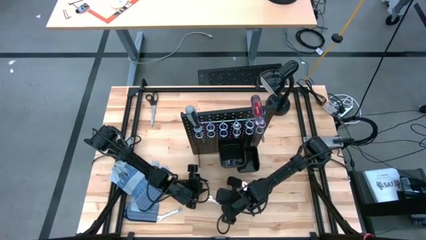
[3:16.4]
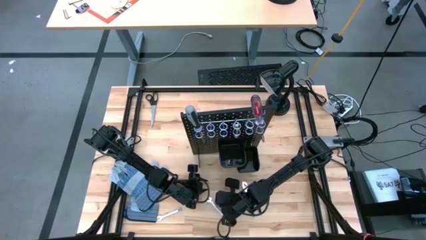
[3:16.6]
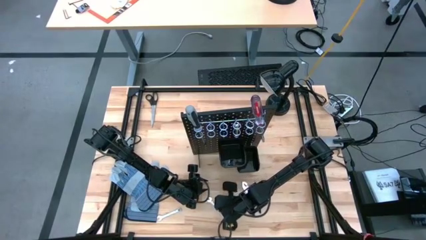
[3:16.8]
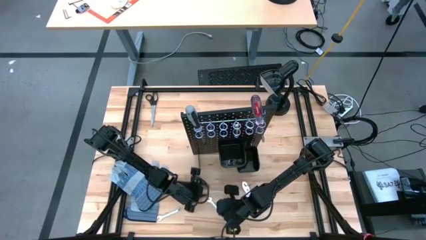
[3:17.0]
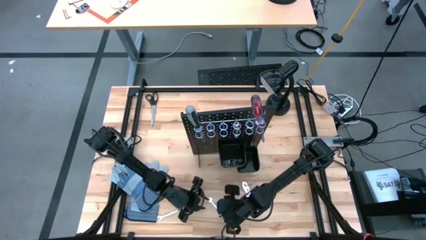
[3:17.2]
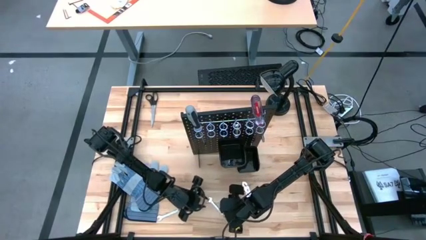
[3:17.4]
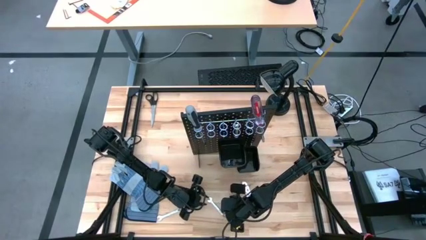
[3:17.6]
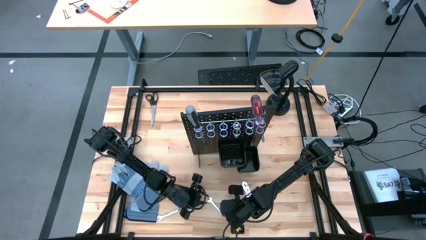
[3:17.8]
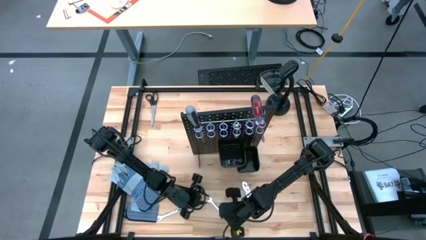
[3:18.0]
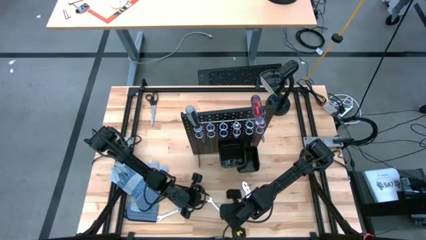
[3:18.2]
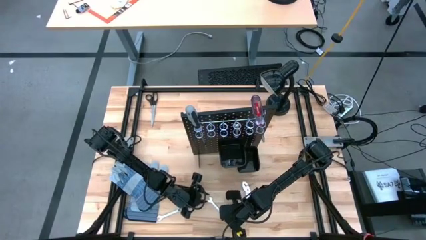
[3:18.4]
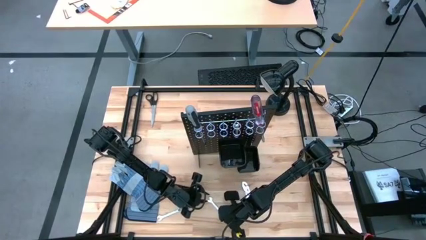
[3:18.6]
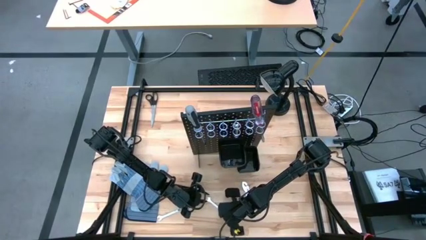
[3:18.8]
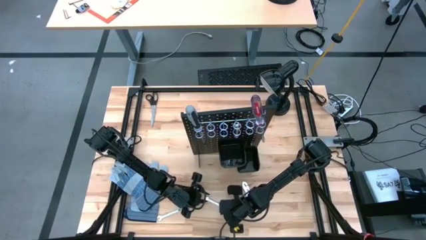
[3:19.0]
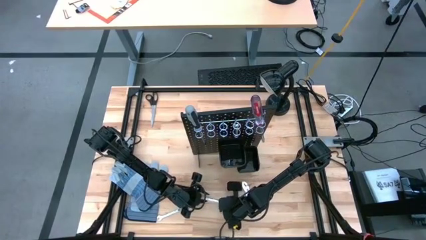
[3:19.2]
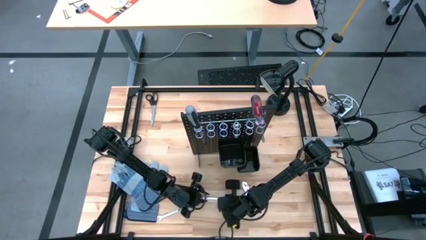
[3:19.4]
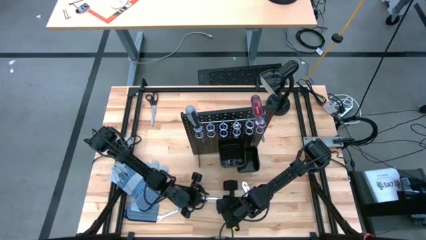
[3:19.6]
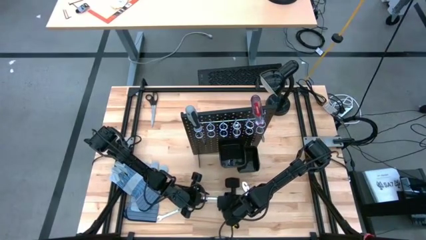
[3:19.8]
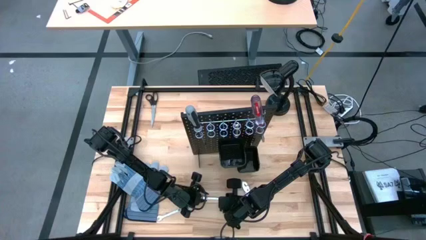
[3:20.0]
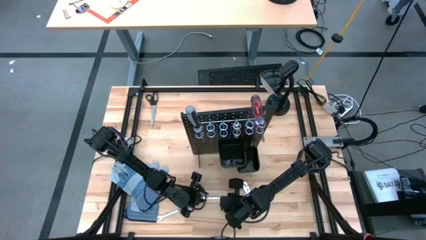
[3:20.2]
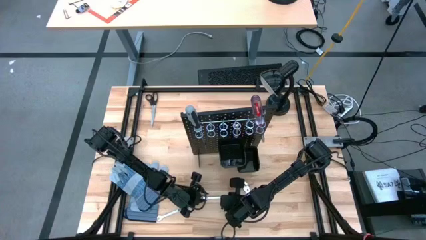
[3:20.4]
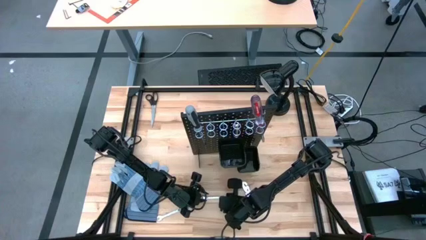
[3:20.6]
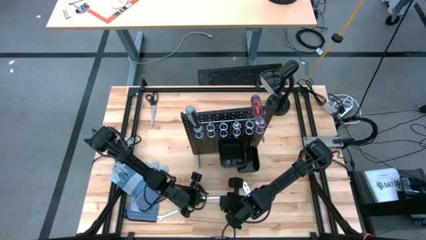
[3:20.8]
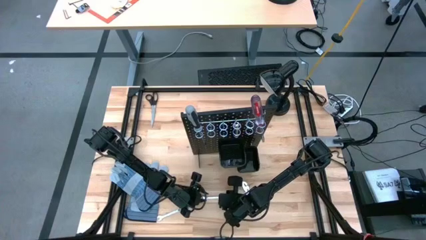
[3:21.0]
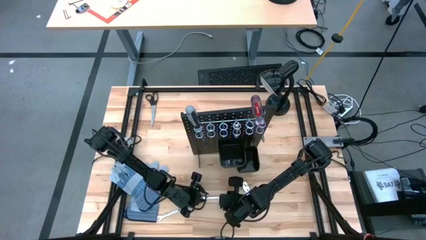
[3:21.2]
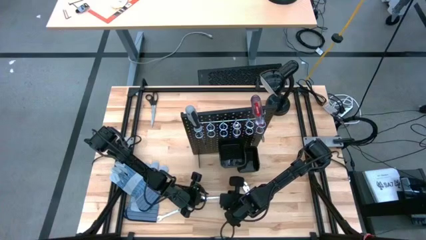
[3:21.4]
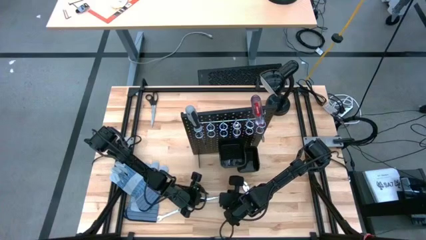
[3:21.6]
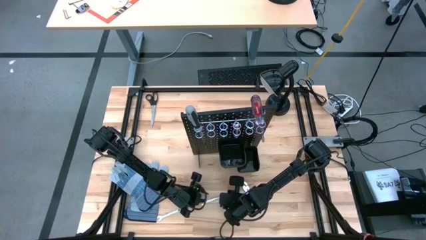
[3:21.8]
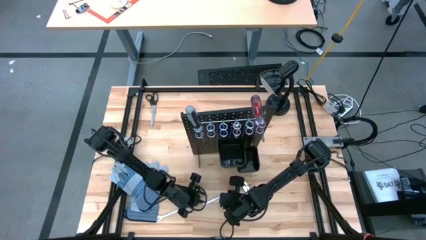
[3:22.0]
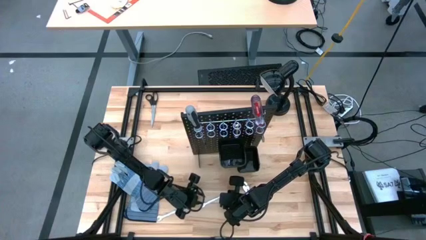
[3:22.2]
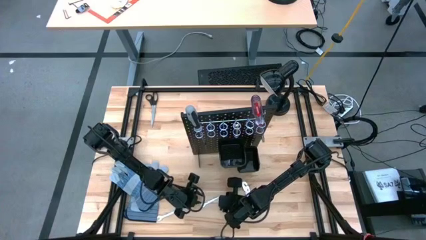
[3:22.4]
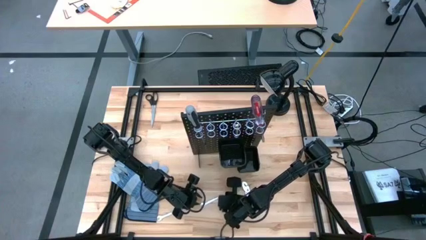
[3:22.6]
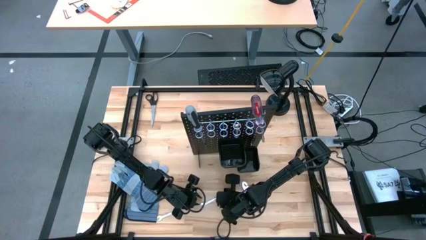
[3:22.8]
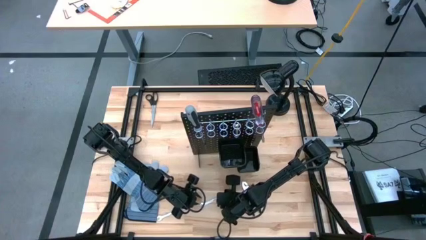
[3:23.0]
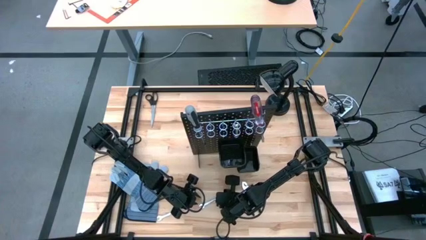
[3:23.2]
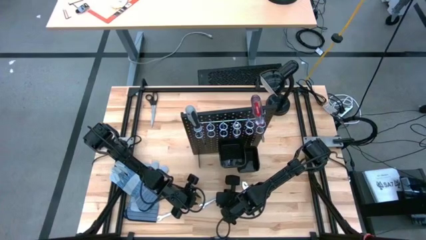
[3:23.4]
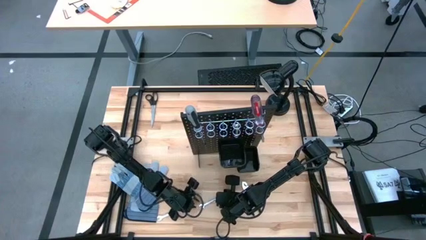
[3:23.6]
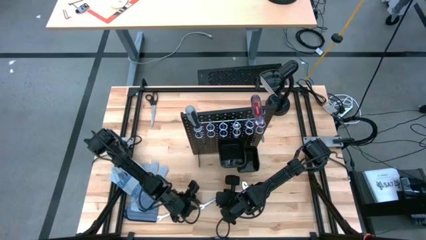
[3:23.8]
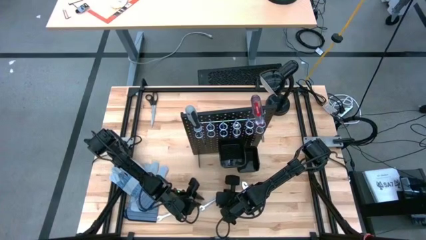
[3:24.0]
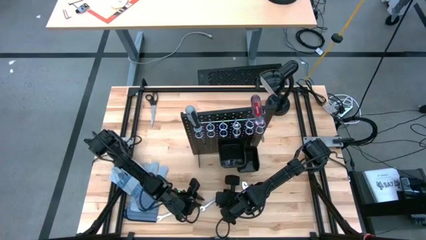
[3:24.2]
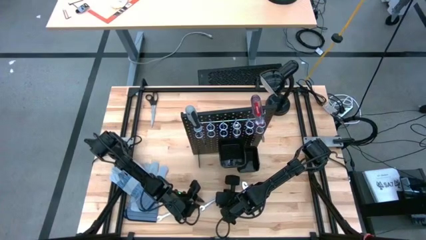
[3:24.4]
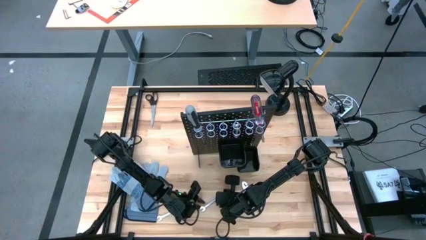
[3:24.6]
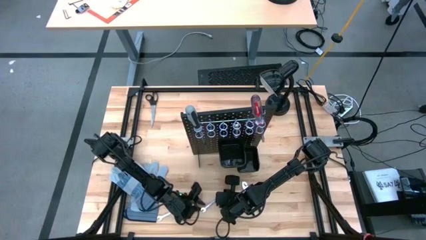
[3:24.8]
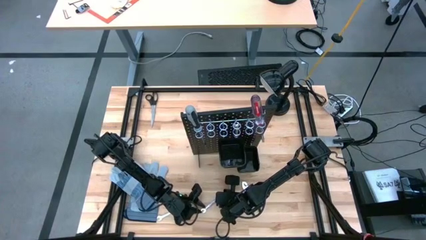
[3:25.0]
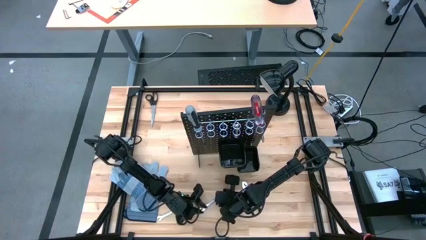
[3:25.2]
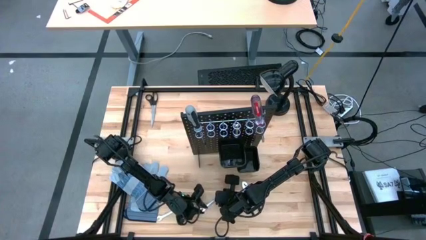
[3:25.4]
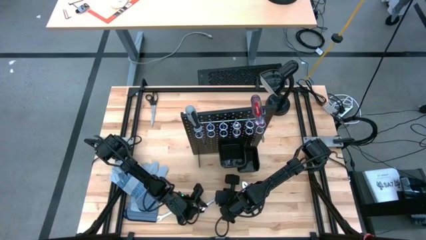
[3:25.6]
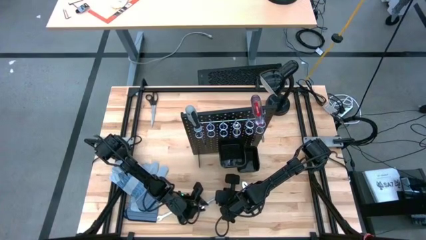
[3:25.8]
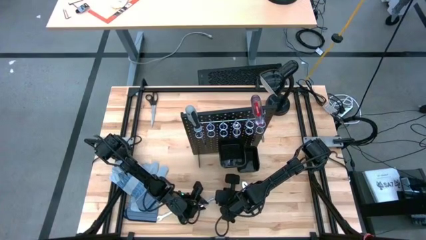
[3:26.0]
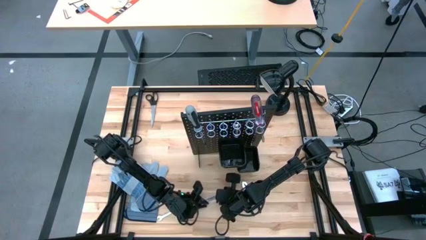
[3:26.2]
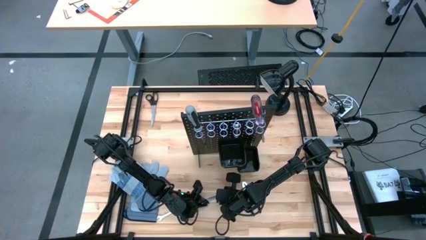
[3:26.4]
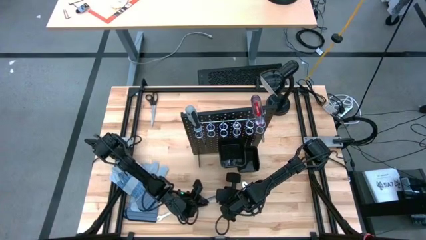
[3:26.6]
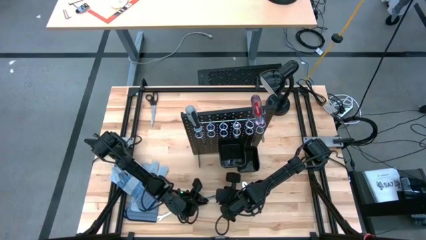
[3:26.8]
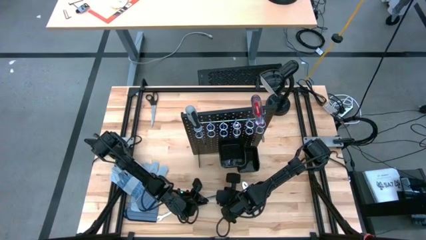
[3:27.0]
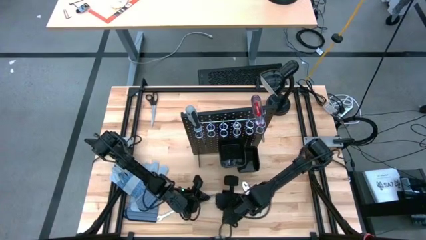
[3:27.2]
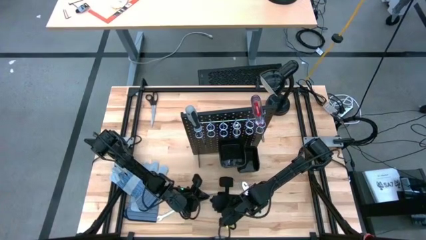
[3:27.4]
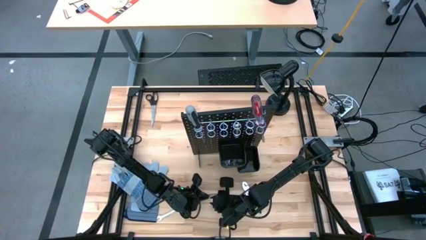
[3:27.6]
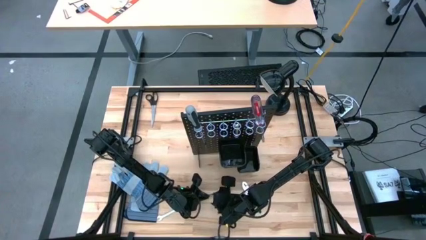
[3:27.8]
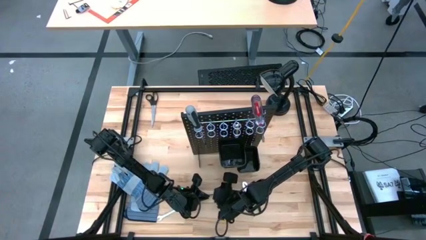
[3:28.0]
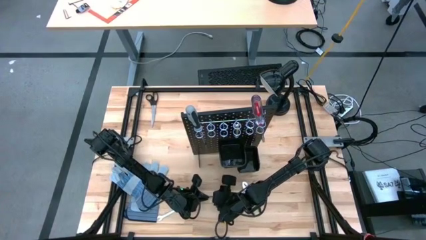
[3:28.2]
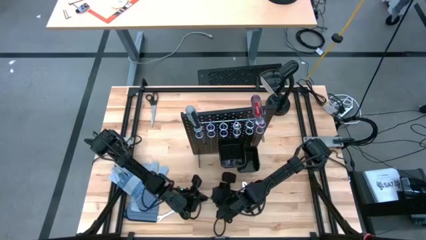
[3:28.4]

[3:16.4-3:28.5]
Task: Hang tools onto peg board
Hang the silver wrench on the black peg board
